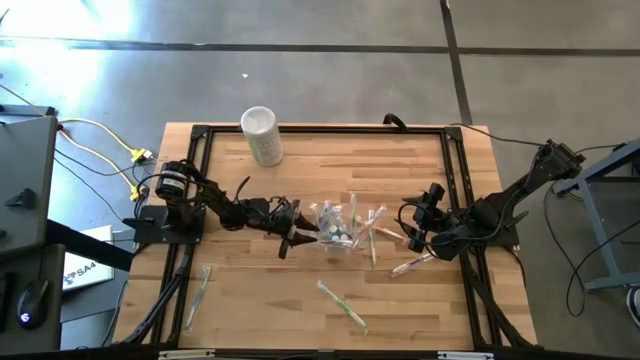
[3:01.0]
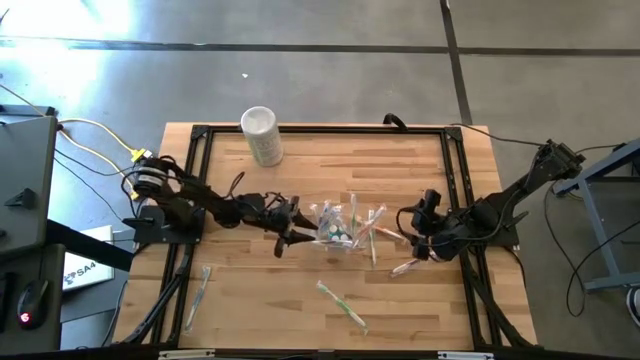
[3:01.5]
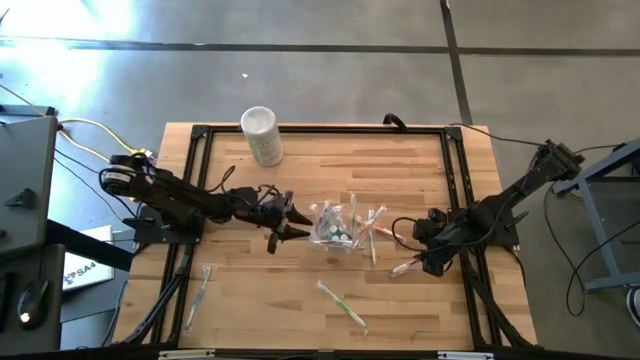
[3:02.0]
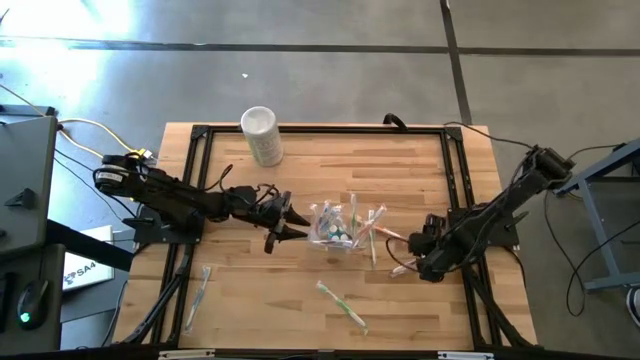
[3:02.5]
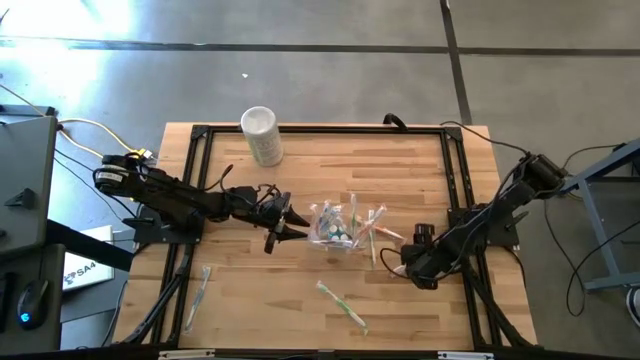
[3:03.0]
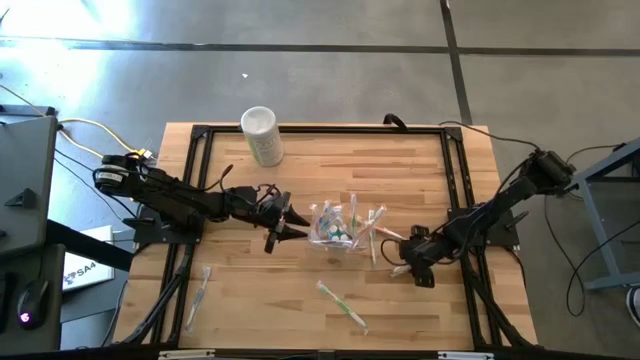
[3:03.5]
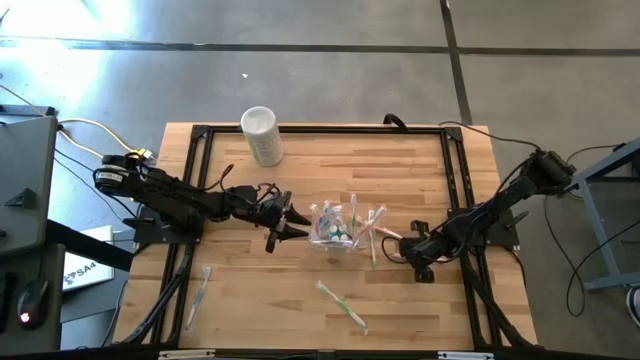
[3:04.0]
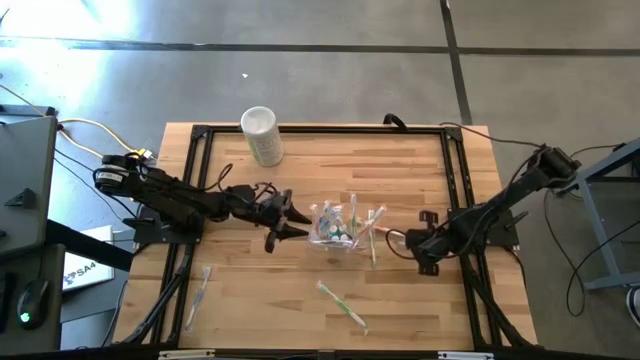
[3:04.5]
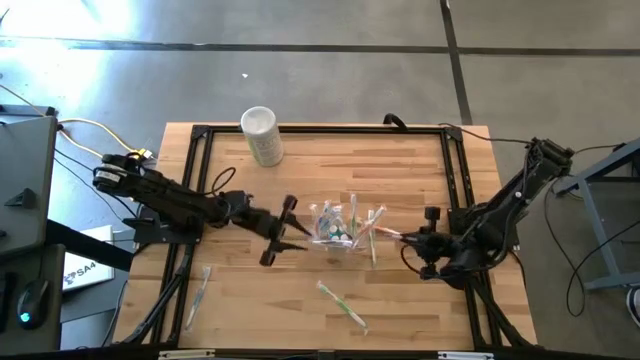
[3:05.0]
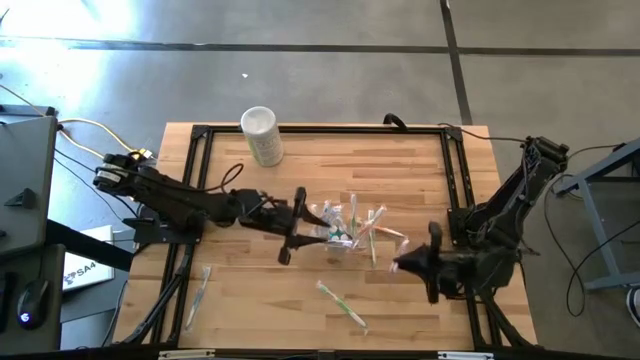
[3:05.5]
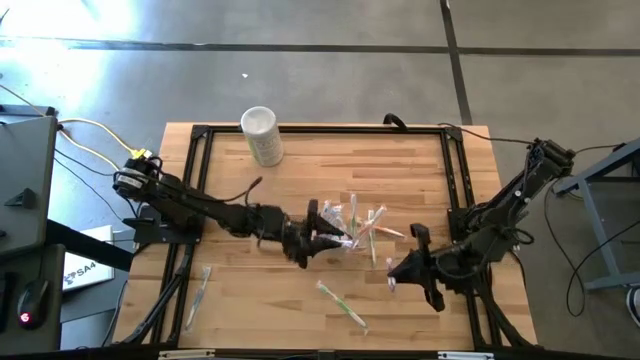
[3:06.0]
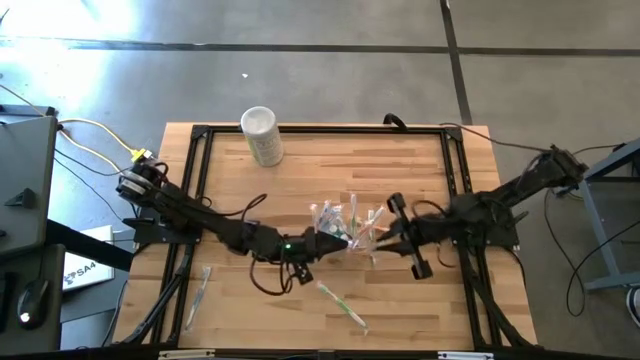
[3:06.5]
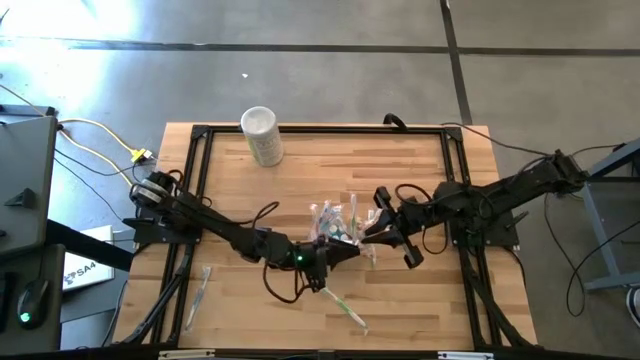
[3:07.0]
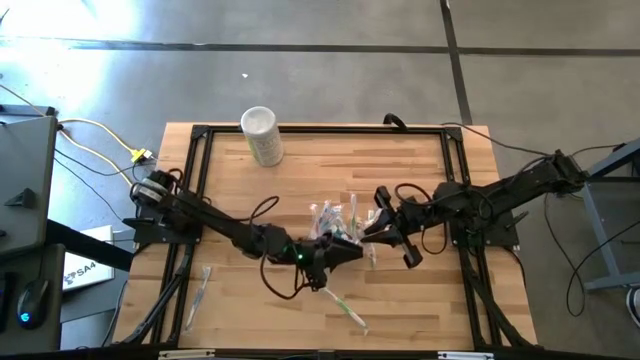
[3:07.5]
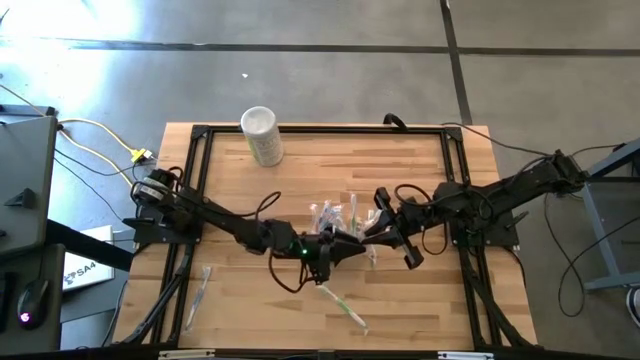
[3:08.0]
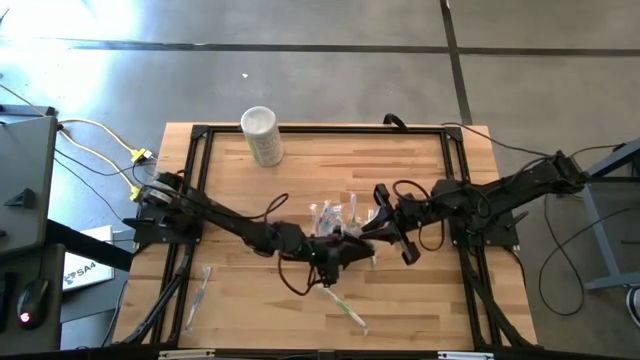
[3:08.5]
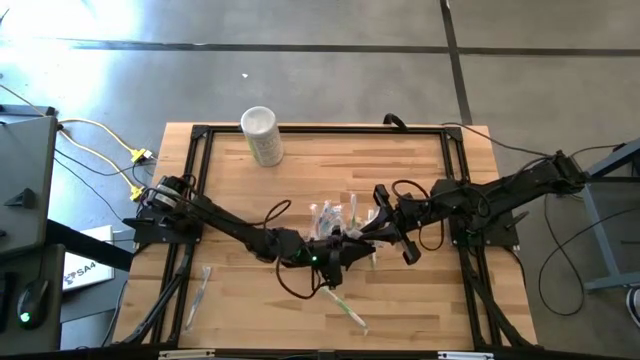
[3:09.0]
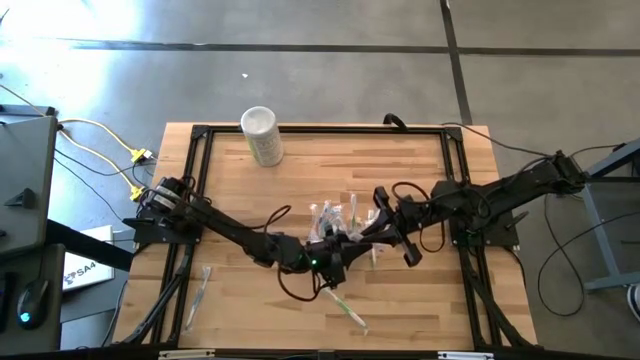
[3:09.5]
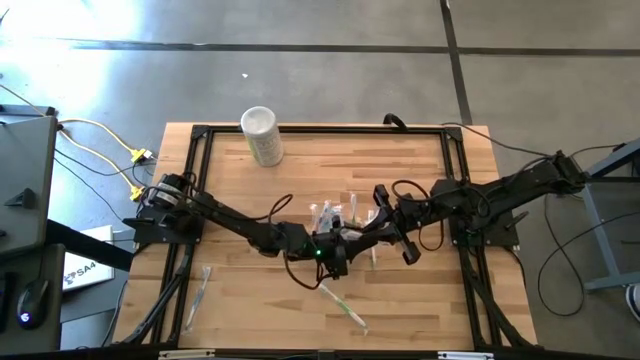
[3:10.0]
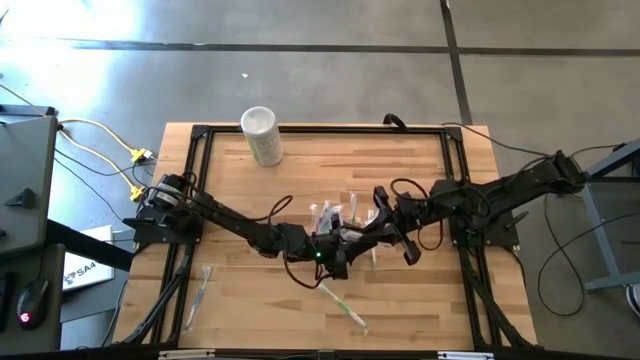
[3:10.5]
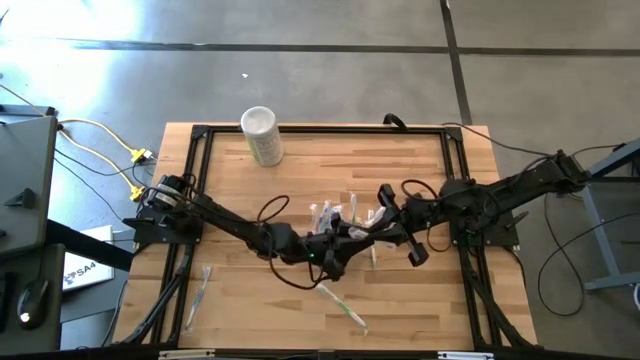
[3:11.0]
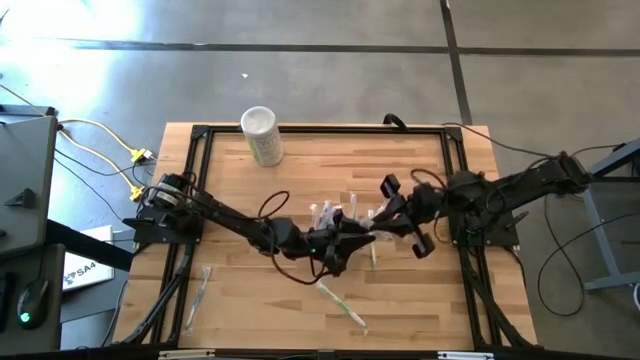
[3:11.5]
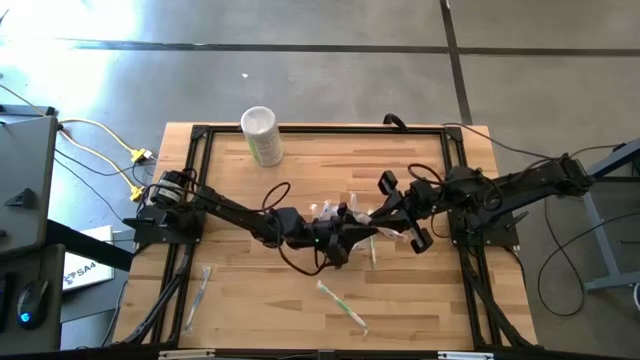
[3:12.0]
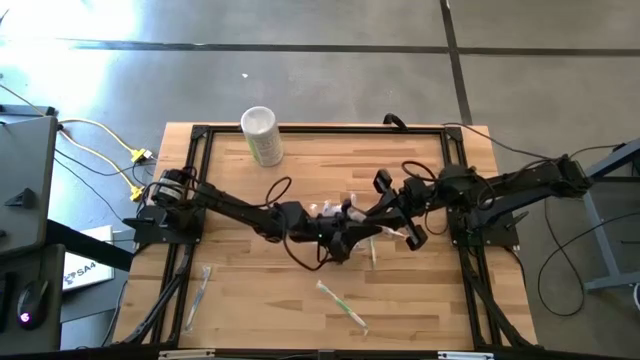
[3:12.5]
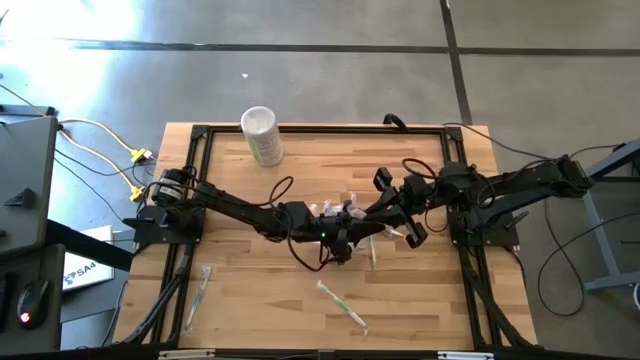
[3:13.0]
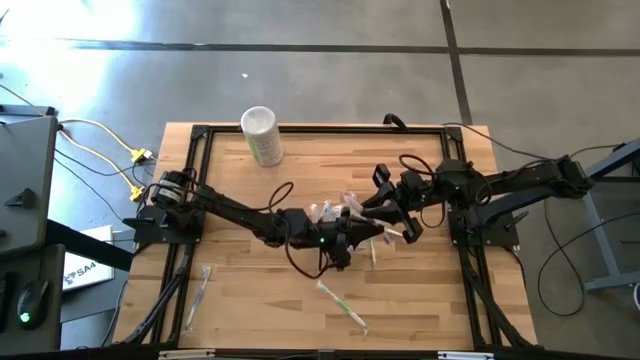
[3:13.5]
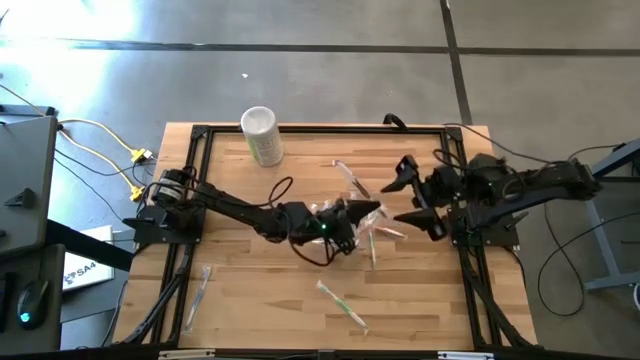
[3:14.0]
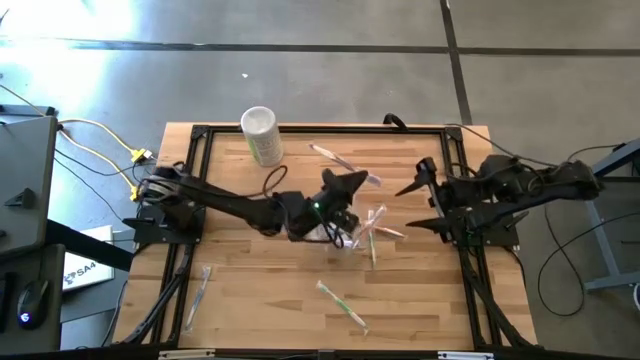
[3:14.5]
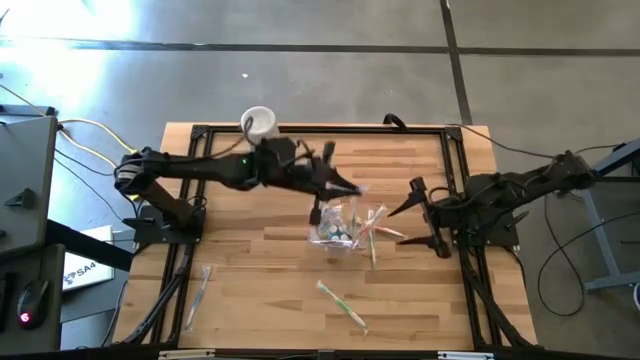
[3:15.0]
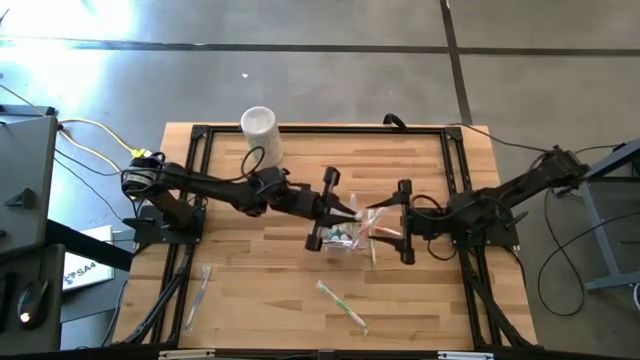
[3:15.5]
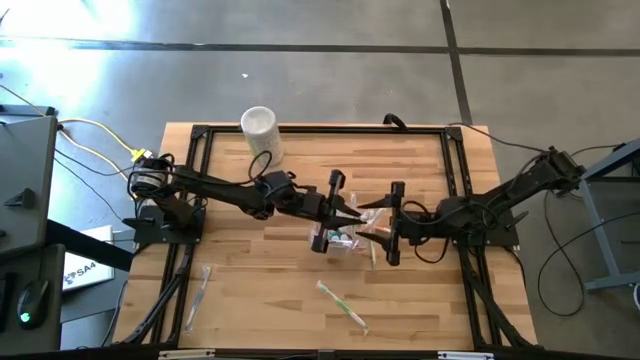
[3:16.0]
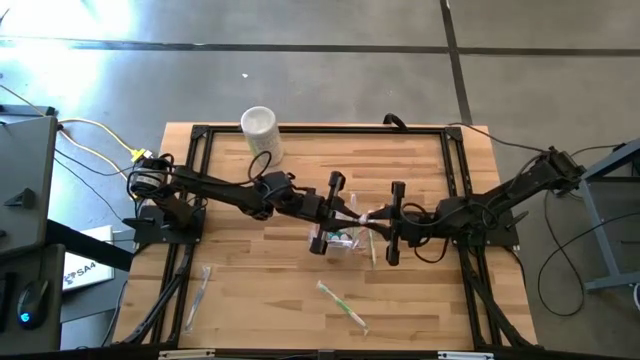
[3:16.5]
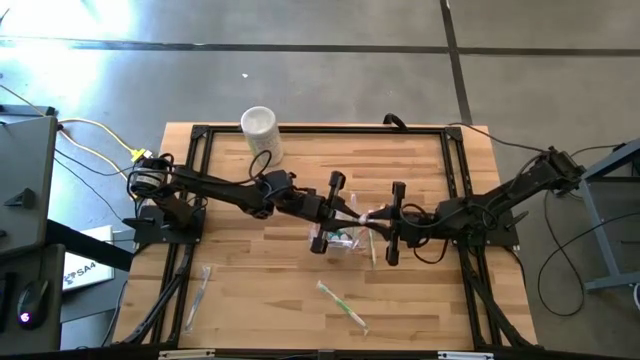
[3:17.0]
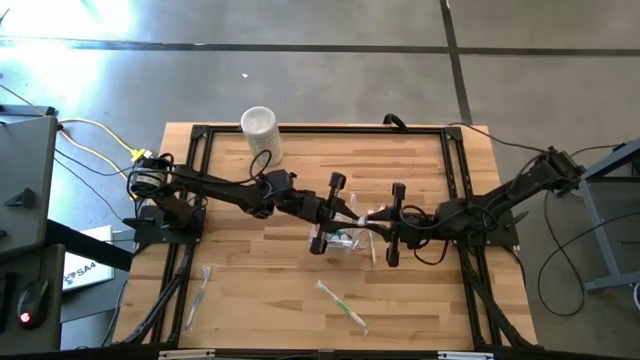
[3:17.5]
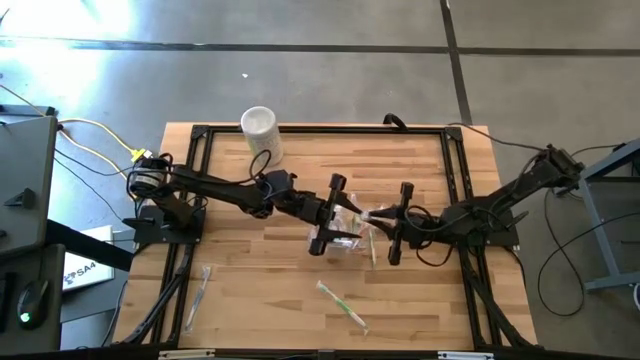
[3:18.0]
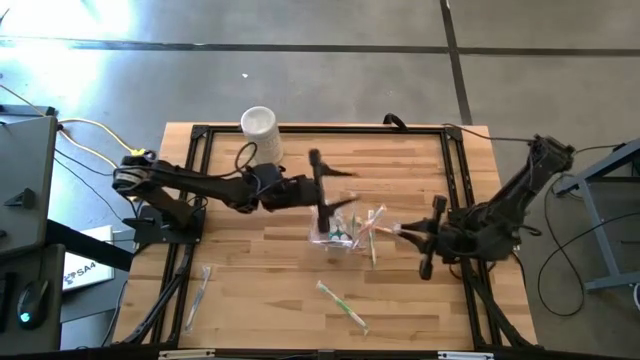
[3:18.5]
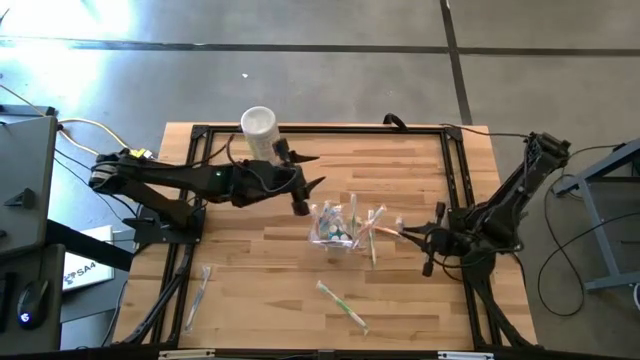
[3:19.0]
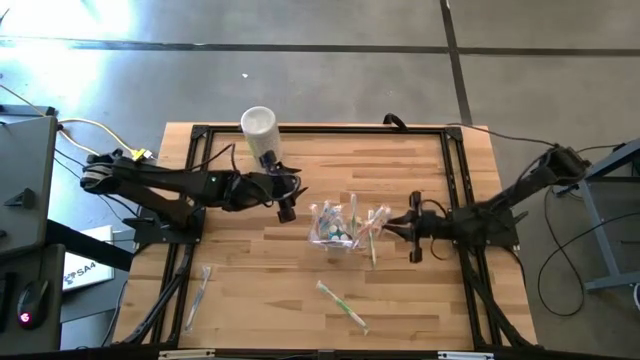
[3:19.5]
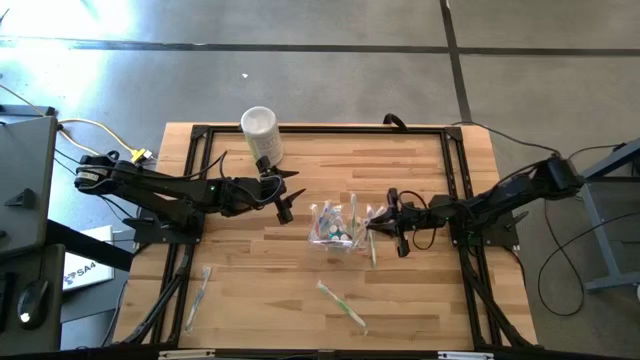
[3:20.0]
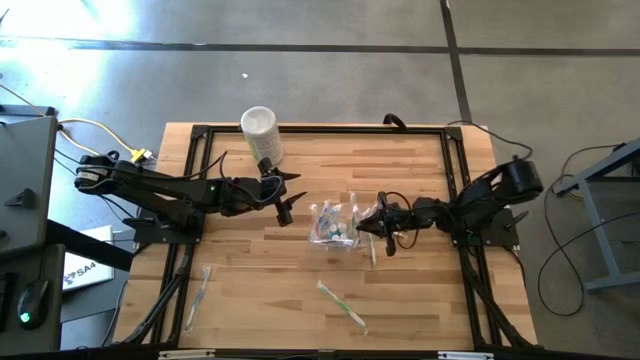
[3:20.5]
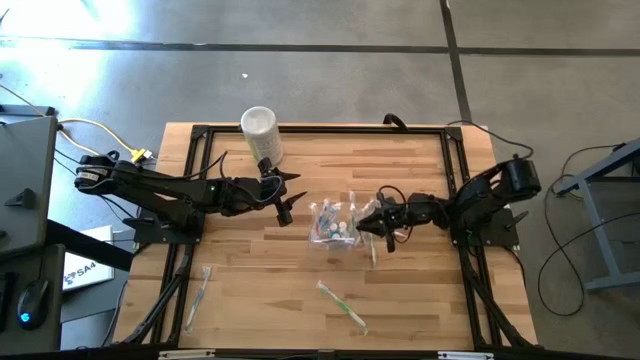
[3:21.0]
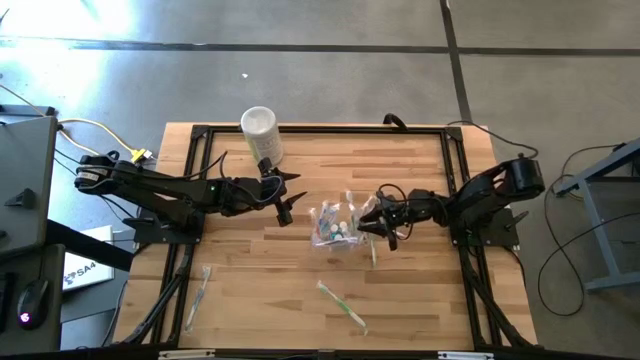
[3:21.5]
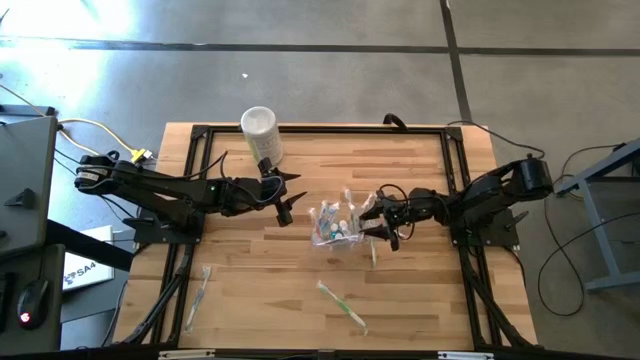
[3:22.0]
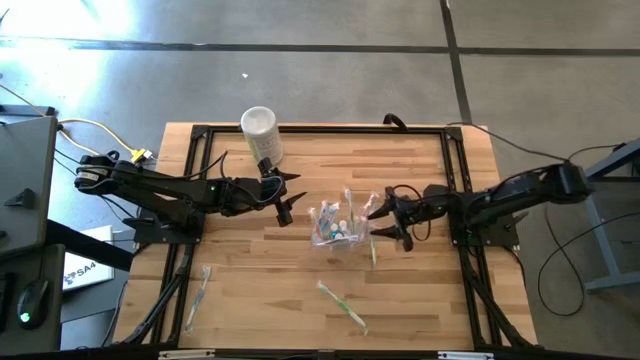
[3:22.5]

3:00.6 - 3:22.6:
Task: Pick & Place toothbrushing station
Put the violet toothbrush into the right section of the transparent organizer
